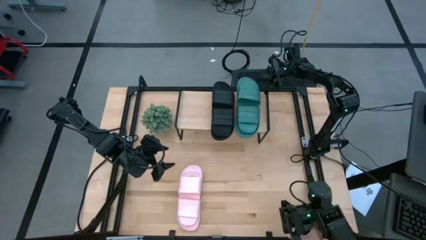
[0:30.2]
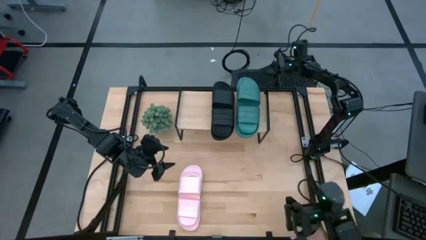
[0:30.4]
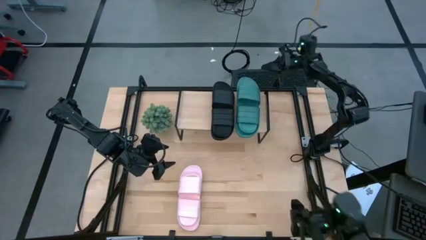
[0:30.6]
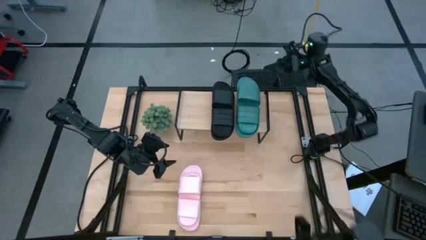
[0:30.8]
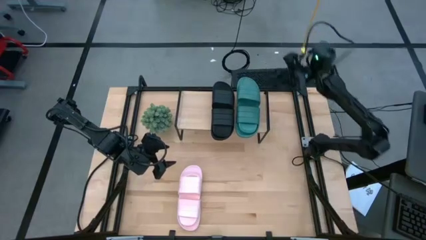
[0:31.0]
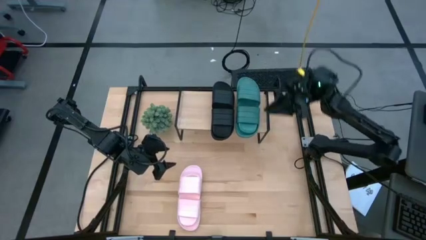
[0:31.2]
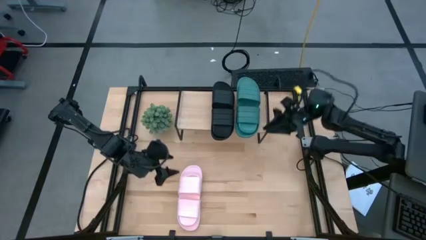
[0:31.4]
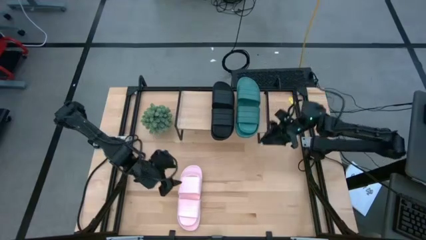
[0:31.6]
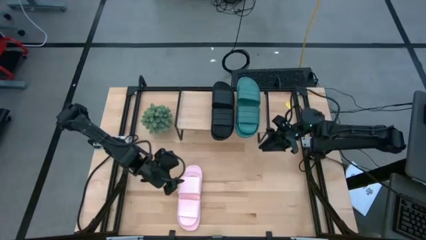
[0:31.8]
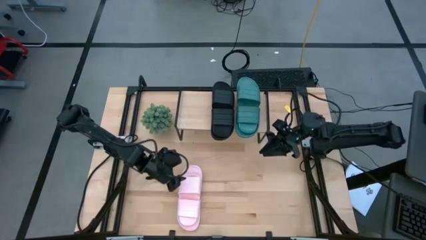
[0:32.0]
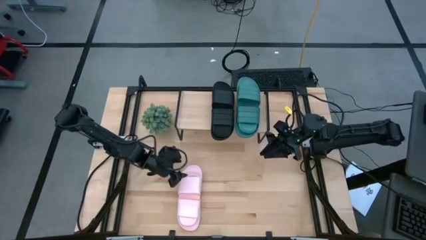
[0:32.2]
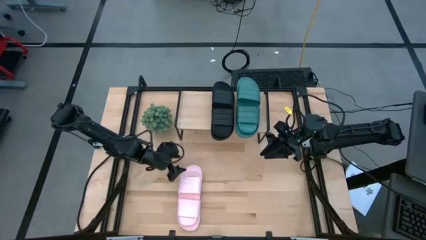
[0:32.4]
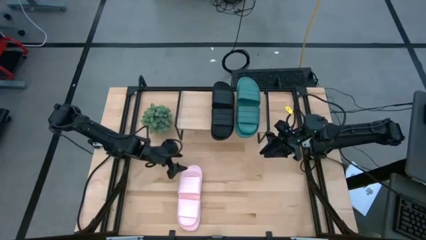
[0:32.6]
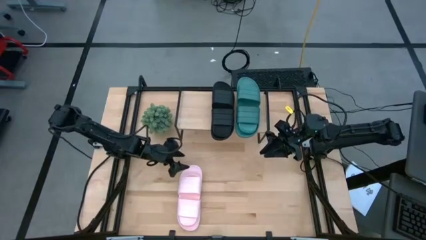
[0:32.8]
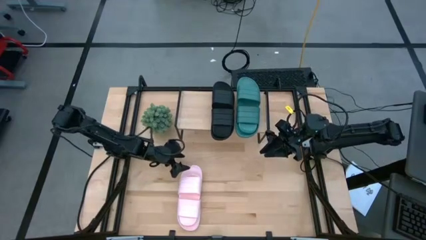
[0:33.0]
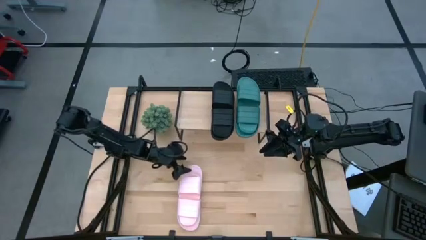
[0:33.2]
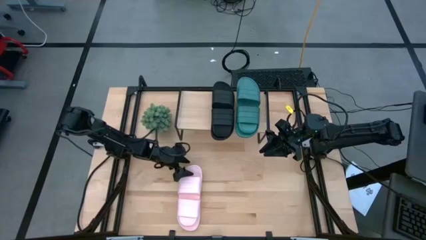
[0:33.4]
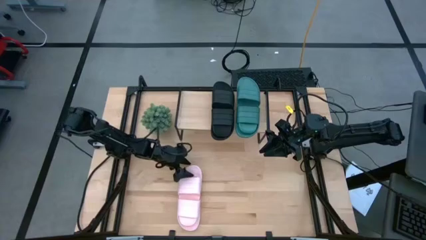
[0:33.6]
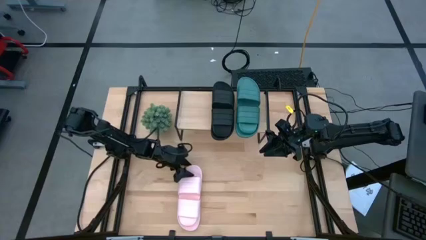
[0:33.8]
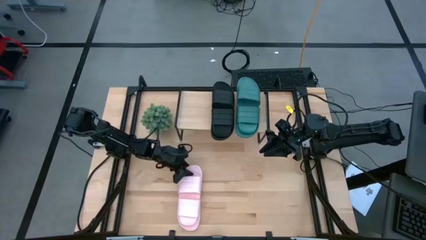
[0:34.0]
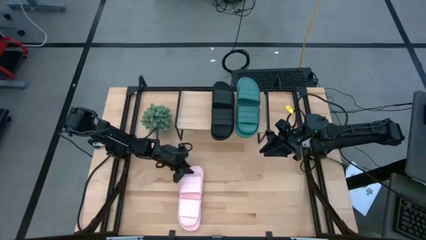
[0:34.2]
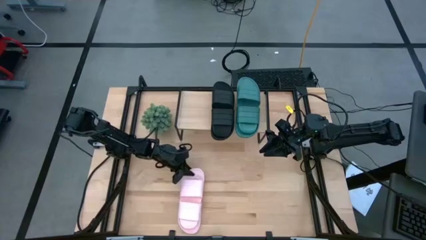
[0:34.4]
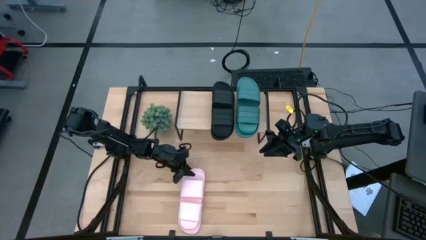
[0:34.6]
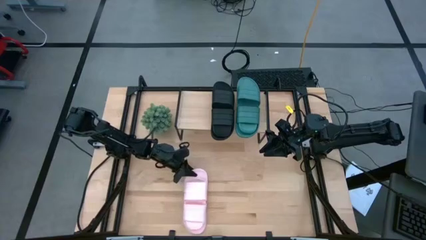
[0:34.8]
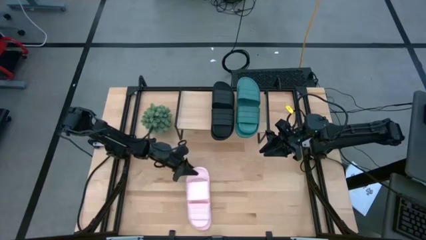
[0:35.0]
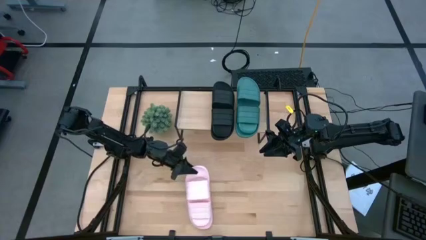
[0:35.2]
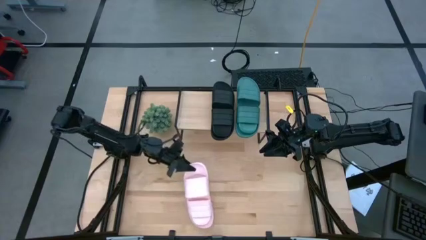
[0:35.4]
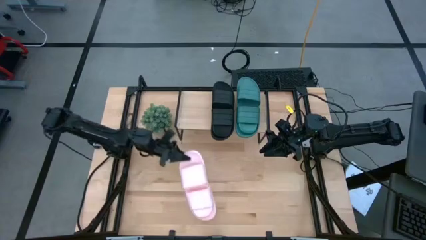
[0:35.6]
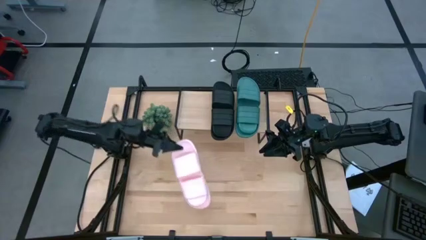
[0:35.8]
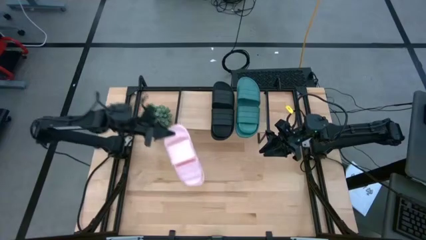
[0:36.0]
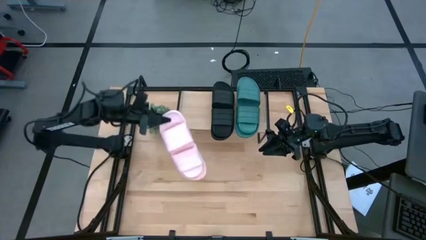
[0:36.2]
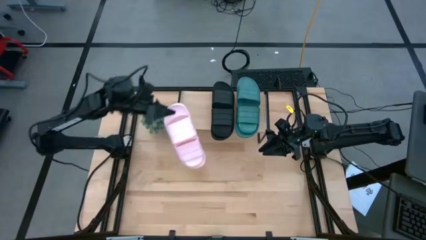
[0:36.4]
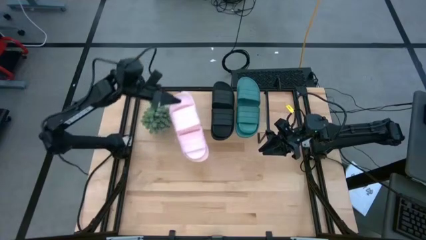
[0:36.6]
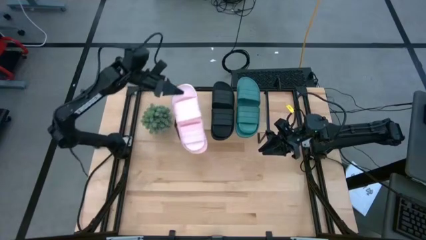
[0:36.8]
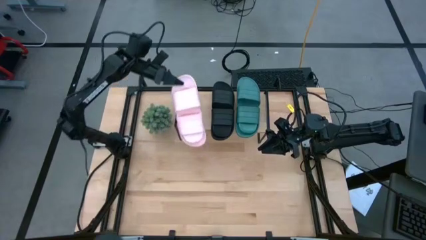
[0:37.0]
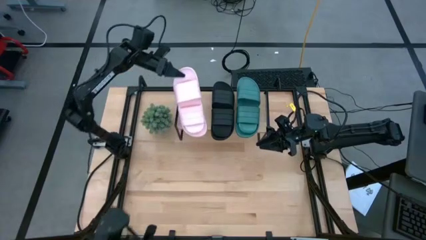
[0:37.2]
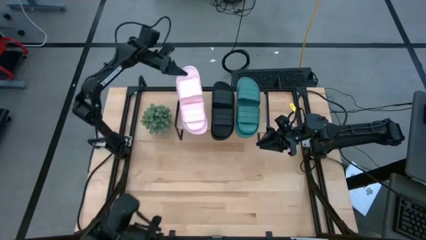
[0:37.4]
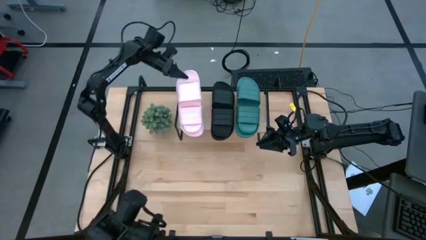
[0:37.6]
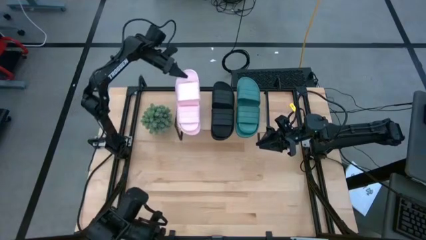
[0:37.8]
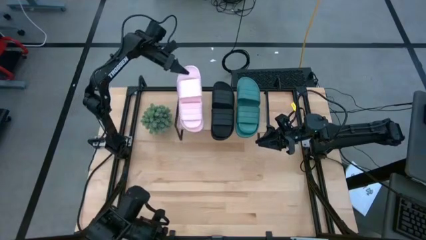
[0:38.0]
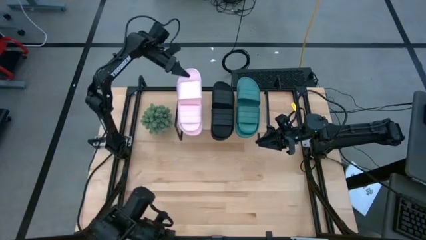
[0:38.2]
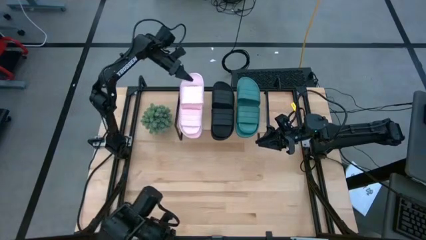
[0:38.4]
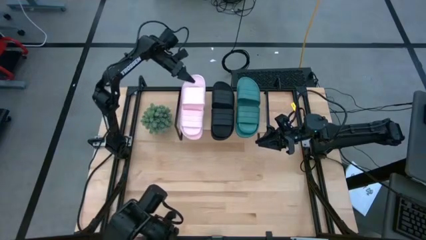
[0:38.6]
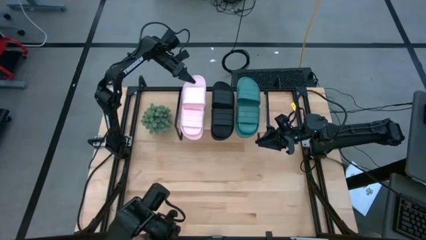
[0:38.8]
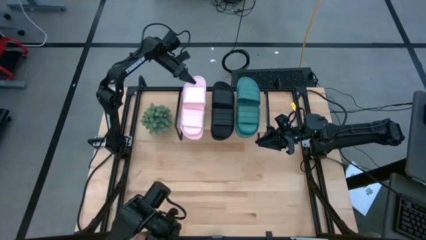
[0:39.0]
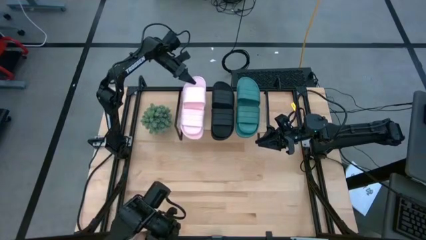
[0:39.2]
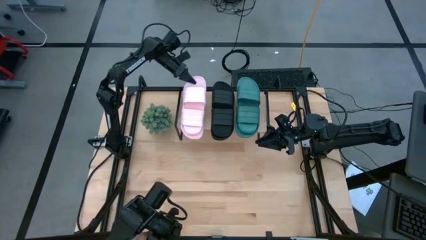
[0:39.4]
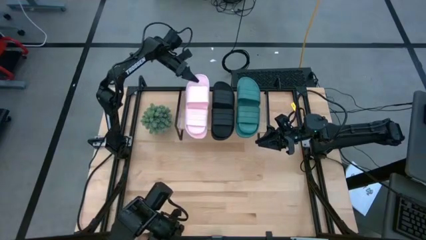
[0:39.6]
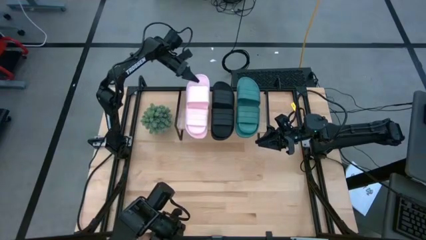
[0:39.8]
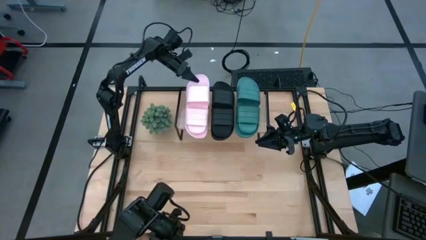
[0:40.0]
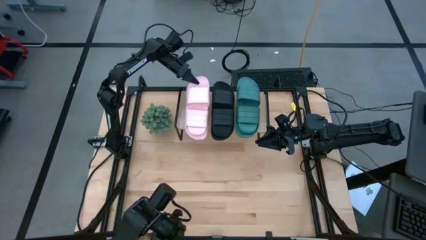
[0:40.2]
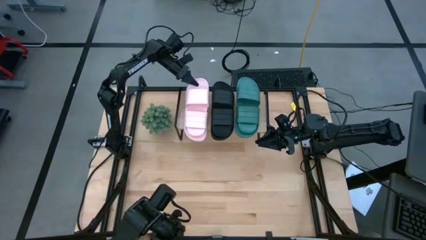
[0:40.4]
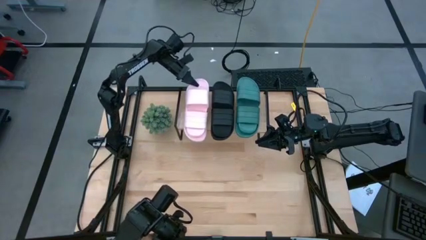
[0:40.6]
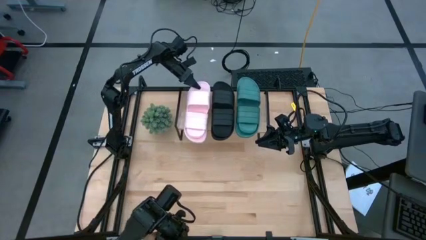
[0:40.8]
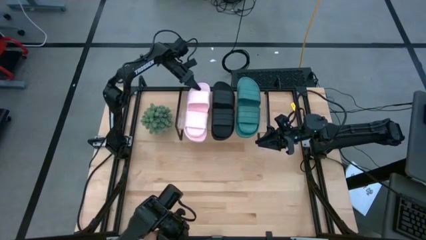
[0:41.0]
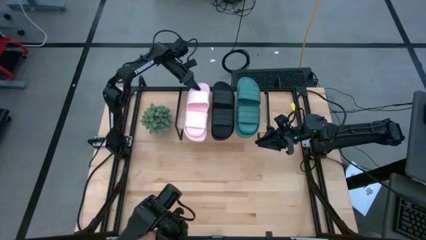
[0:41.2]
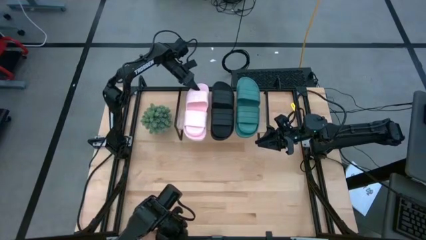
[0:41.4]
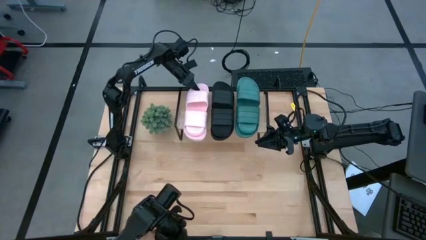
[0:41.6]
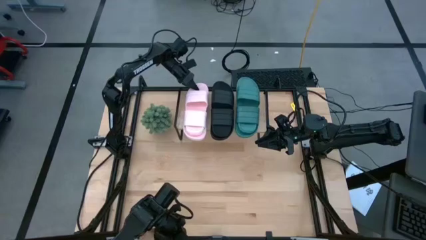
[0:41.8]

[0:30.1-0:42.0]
Task: Pick and place slides into the shelf
Put the pink slippers on the shelf
